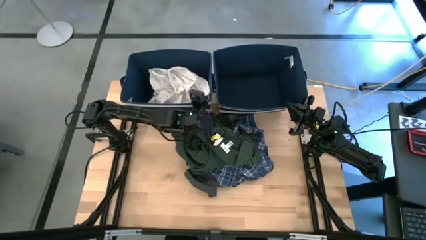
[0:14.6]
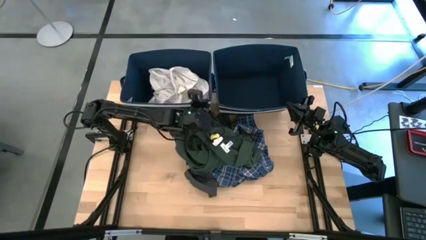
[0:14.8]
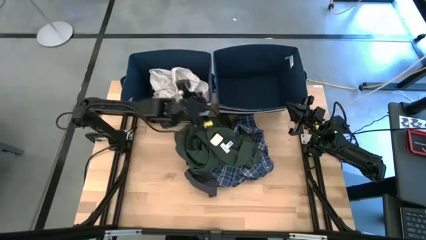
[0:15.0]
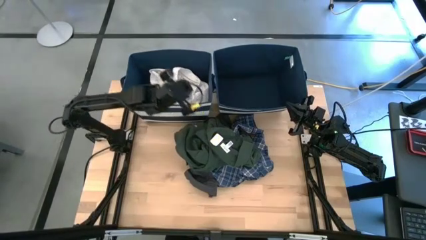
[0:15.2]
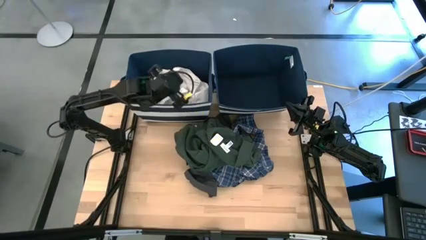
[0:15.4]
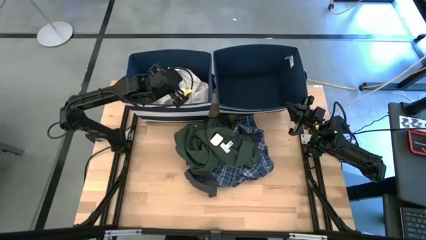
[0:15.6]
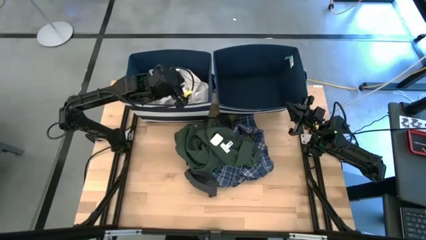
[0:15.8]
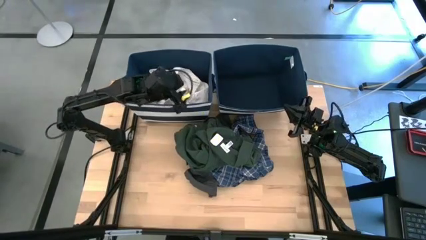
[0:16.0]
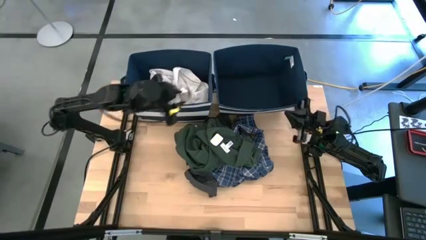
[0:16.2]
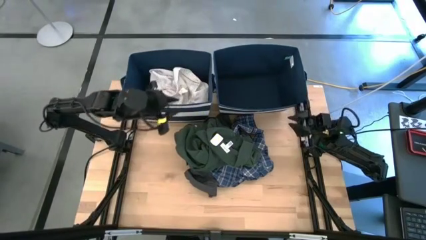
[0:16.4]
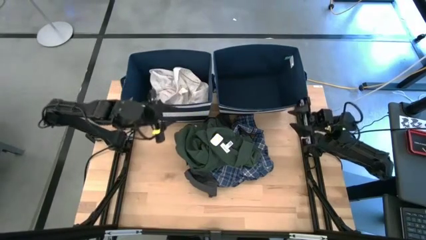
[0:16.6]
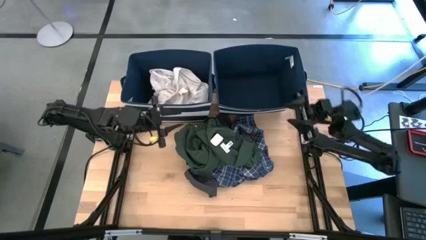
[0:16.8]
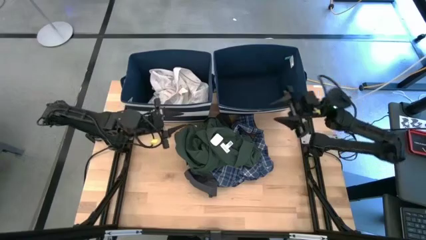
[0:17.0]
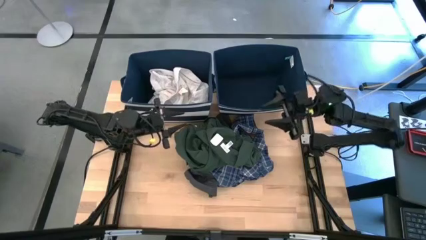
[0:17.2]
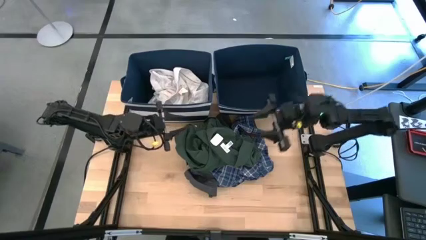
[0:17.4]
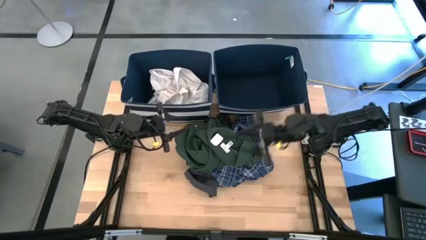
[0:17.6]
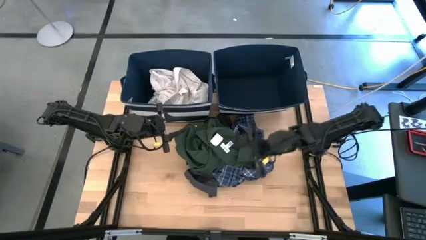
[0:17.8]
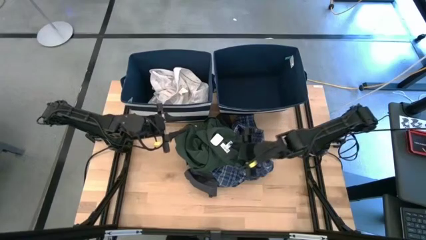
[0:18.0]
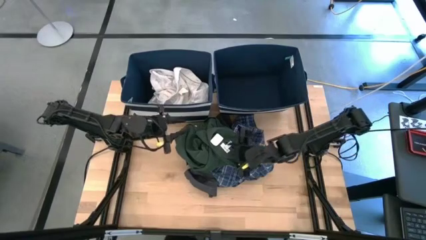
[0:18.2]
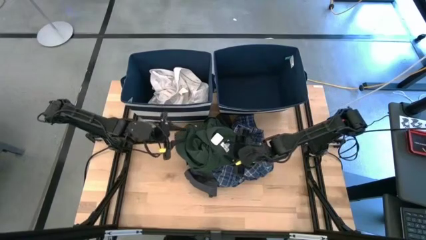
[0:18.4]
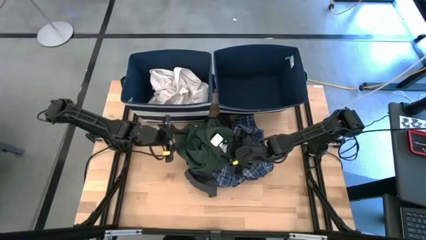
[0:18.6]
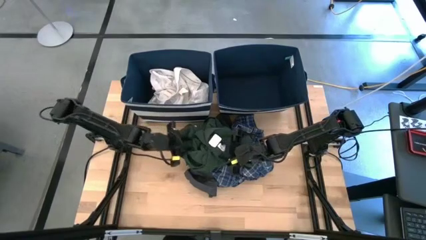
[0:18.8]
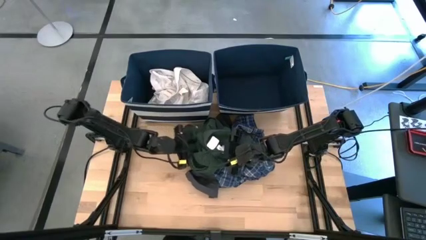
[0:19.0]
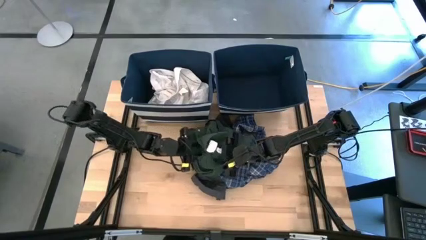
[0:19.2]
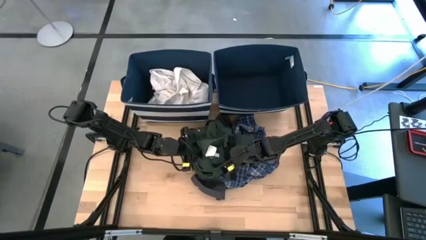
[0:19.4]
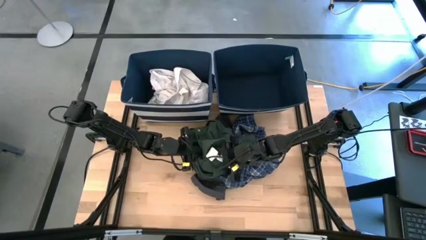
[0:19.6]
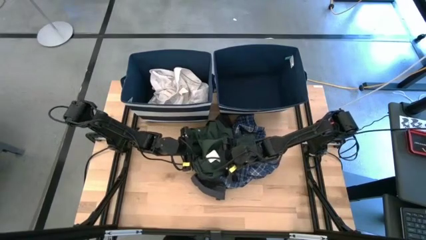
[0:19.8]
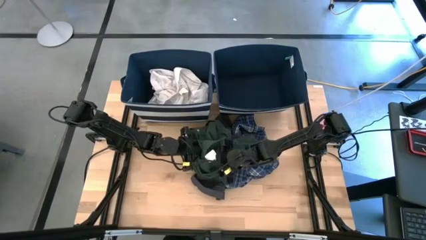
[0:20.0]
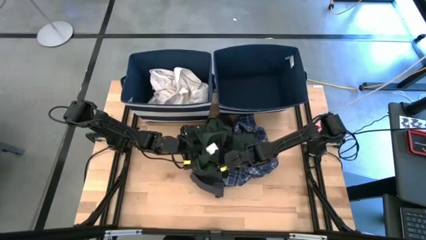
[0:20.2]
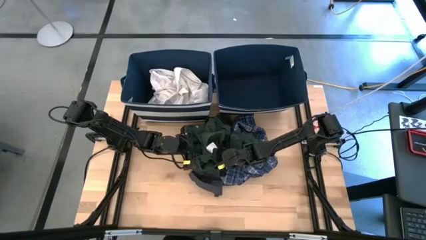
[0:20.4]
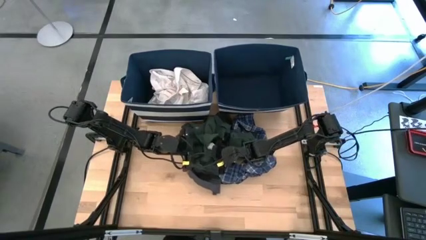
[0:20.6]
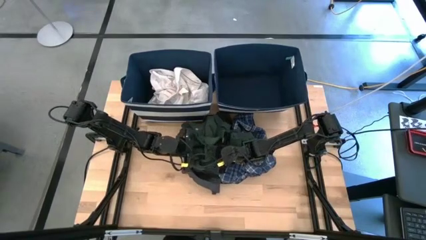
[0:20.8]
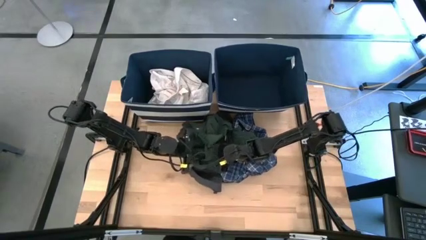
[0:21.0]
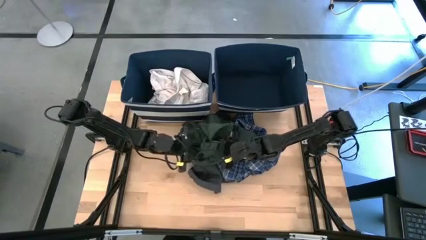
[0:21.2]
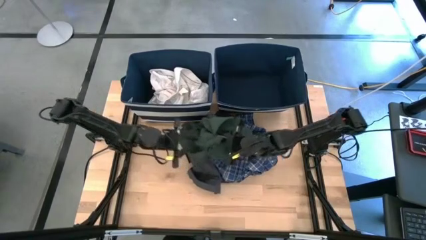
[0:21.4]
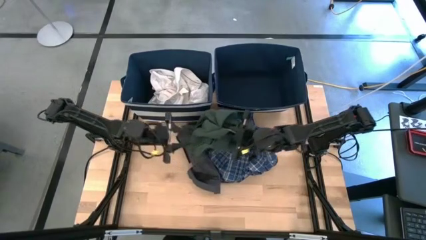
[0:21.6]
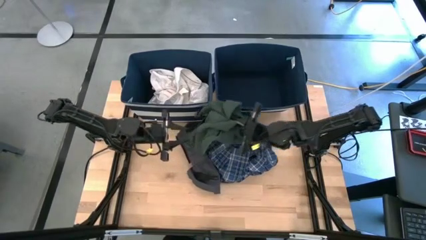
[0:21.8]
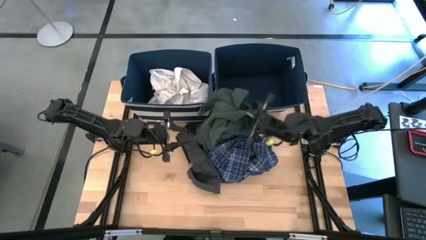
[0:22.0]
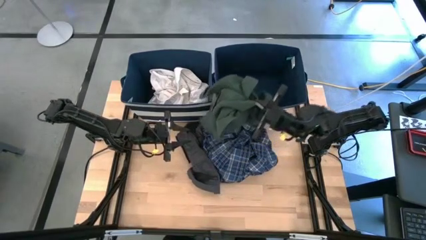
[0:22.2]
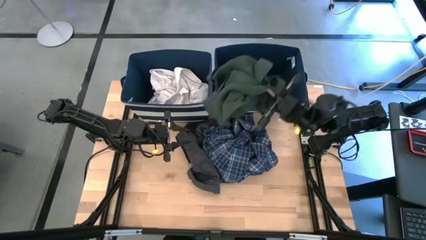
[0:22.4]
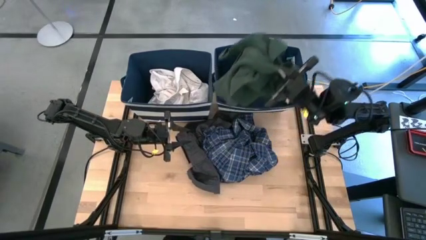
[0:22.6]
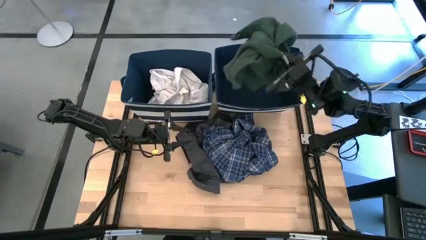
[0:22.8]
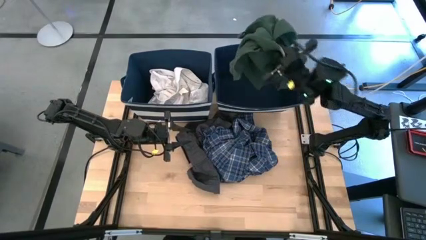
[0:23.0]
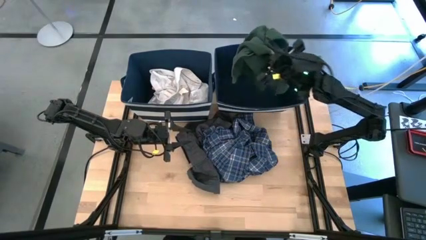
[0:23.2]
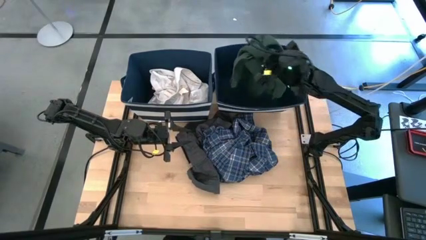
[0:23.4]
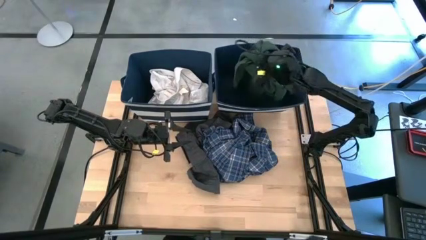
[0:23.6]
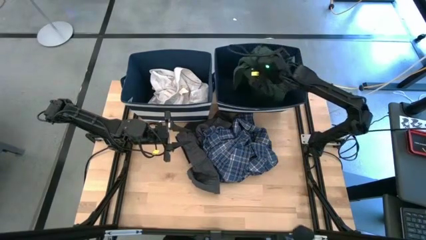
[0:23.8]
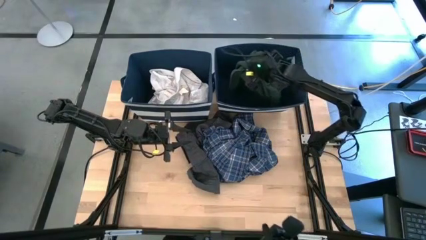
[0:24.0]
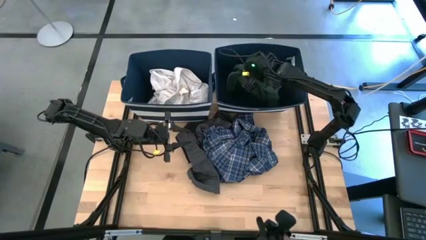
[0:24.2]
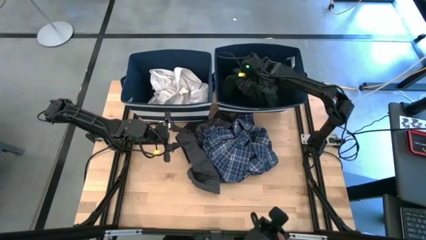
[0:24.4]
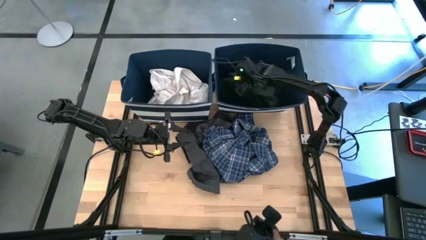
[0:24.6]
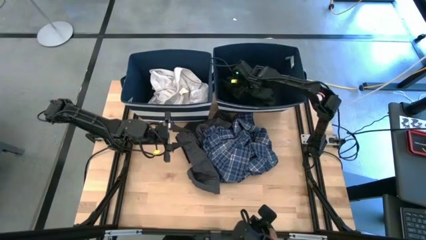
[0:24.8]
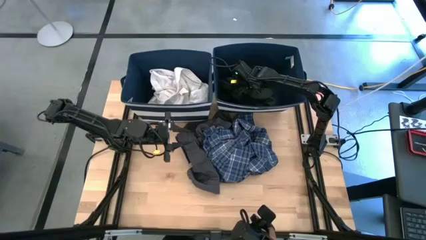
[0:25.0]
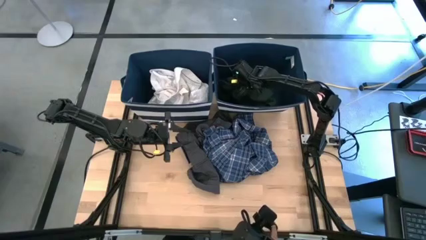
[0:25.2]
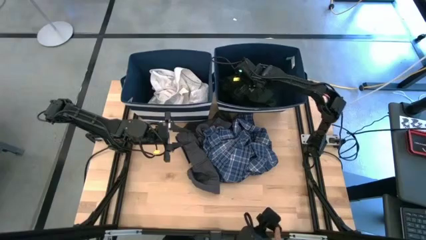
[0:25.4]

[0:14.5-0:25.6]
Task: Sort clothes
Put the green polo shirt into the right blue laundry basket
